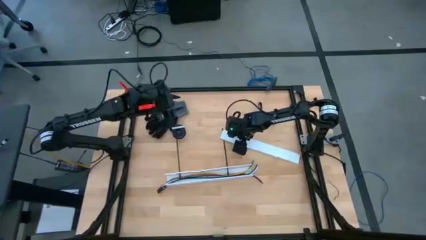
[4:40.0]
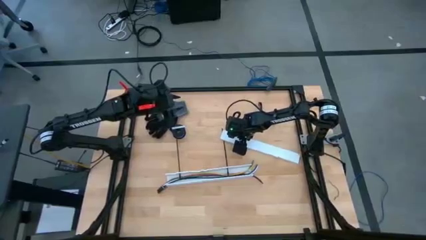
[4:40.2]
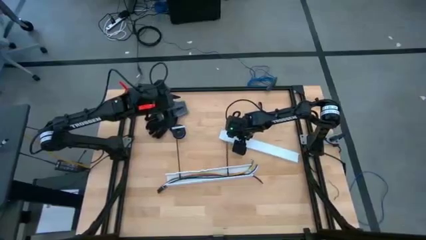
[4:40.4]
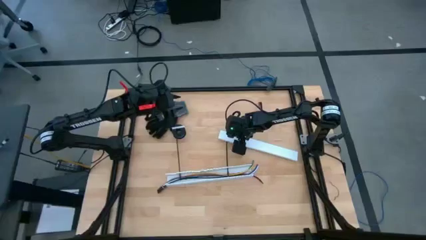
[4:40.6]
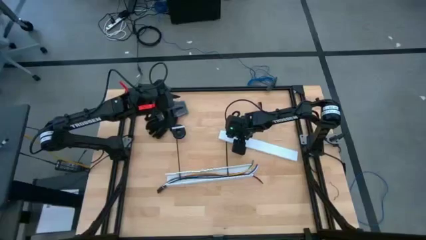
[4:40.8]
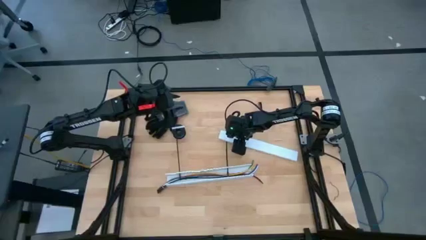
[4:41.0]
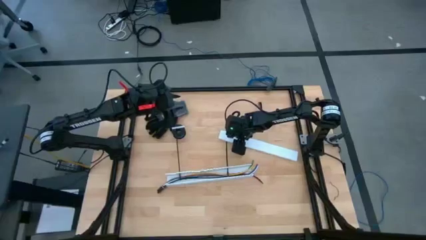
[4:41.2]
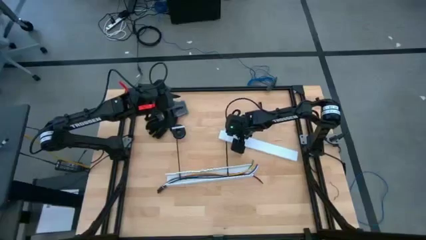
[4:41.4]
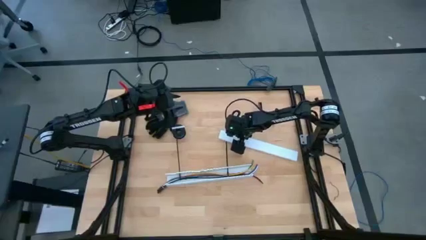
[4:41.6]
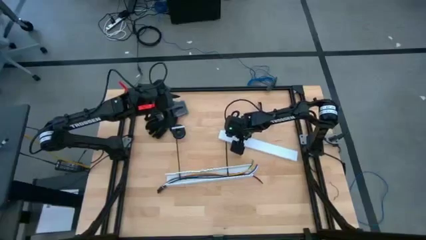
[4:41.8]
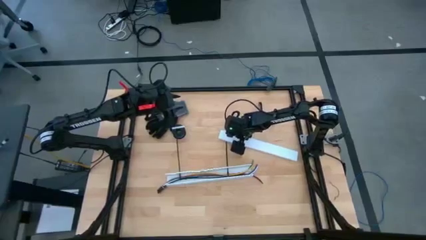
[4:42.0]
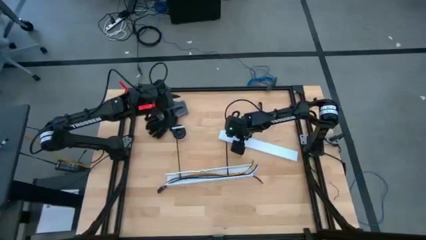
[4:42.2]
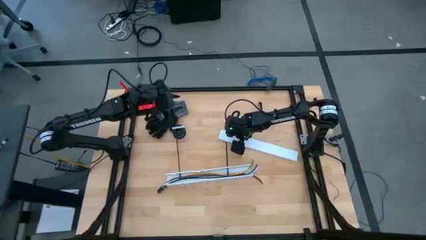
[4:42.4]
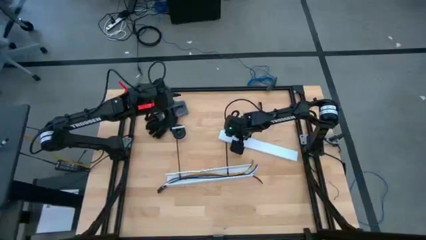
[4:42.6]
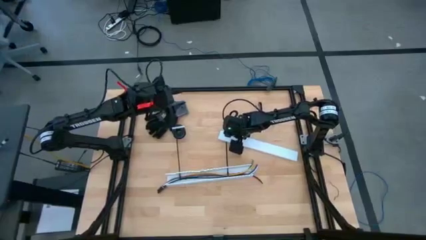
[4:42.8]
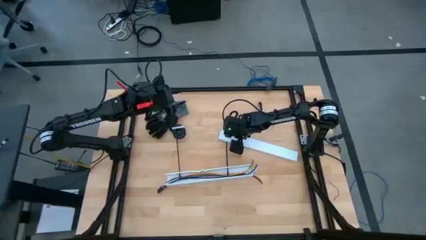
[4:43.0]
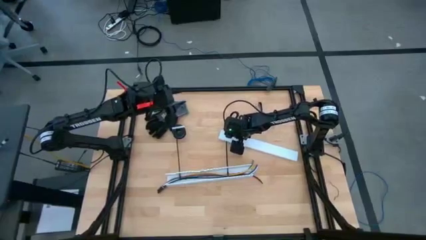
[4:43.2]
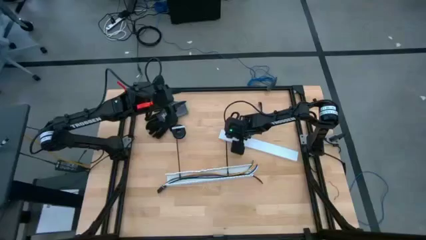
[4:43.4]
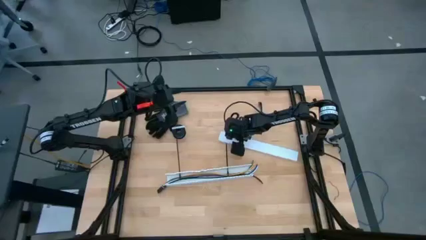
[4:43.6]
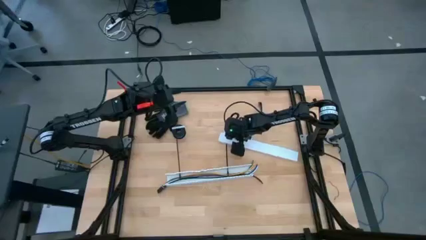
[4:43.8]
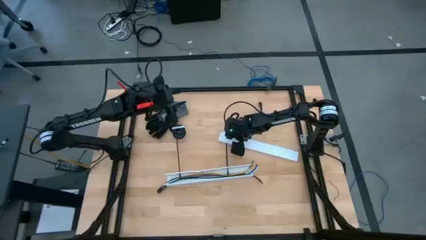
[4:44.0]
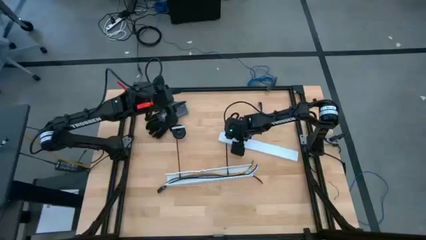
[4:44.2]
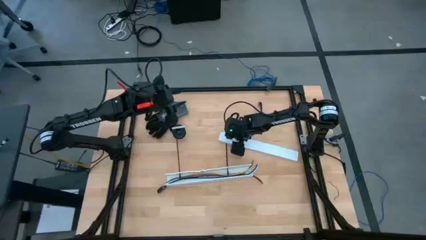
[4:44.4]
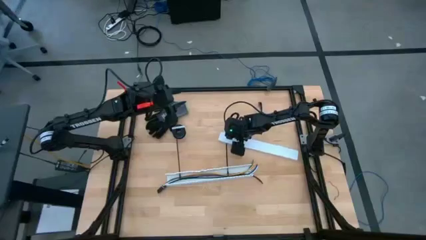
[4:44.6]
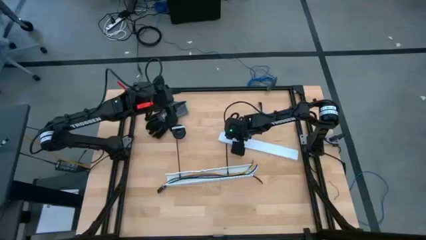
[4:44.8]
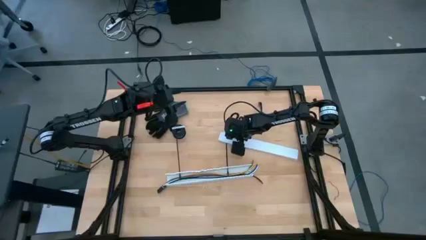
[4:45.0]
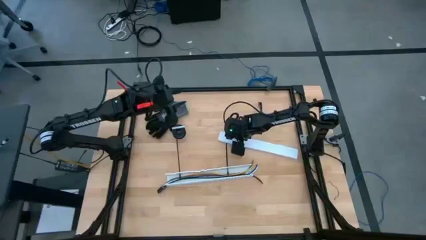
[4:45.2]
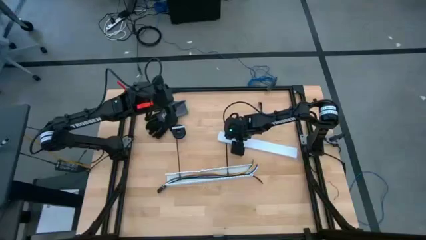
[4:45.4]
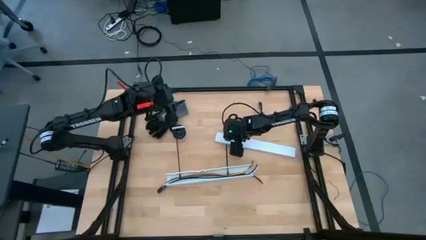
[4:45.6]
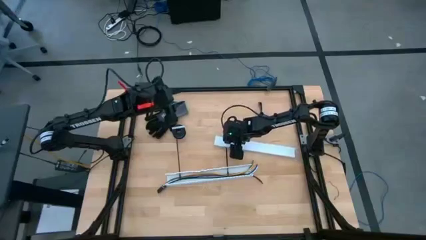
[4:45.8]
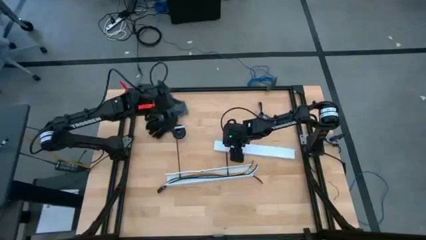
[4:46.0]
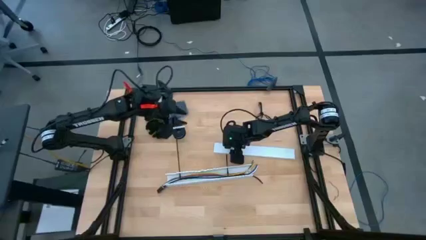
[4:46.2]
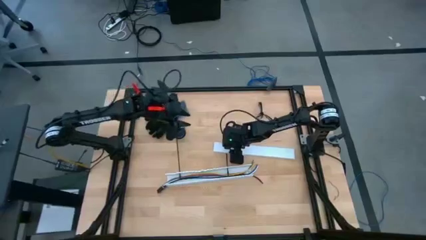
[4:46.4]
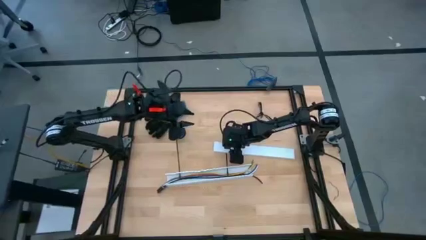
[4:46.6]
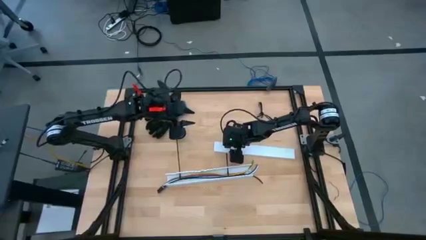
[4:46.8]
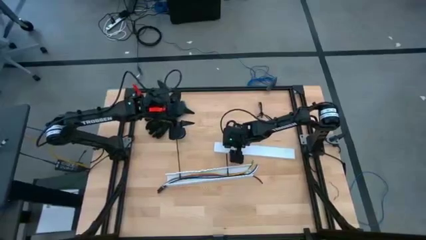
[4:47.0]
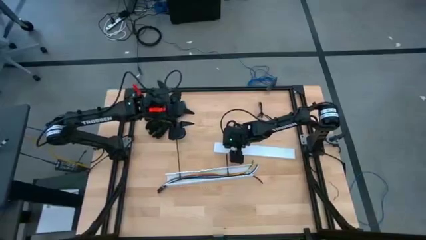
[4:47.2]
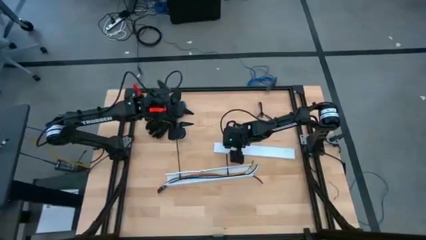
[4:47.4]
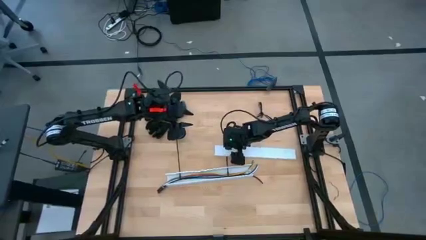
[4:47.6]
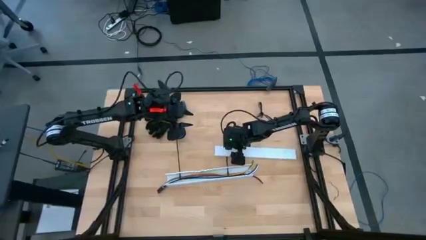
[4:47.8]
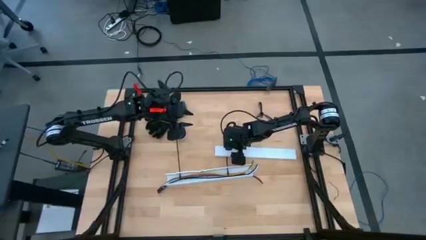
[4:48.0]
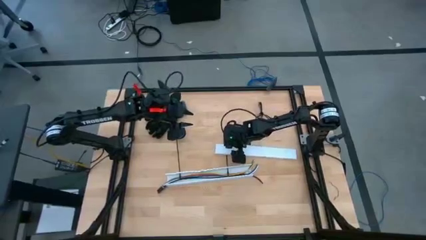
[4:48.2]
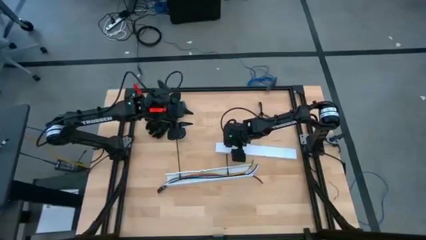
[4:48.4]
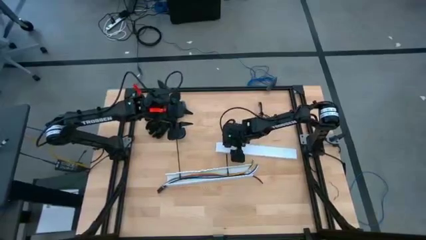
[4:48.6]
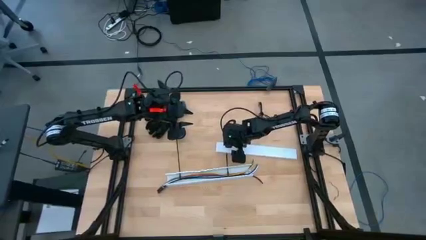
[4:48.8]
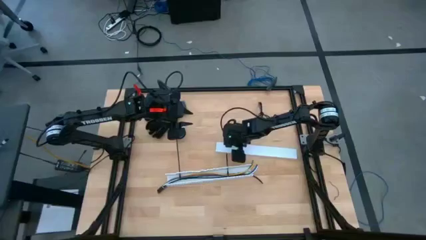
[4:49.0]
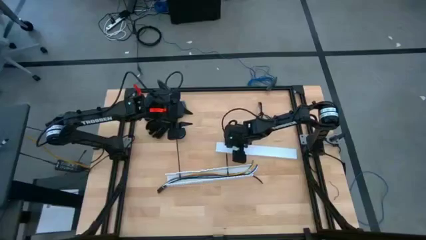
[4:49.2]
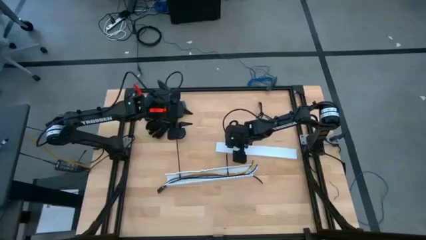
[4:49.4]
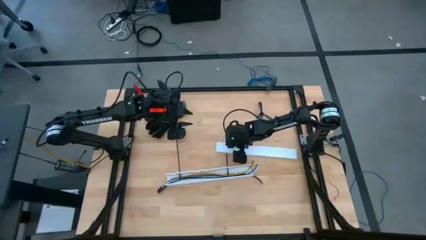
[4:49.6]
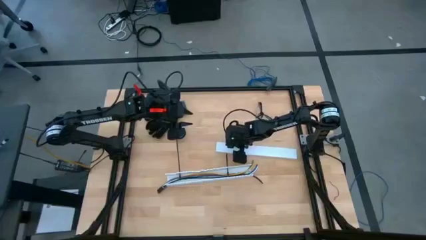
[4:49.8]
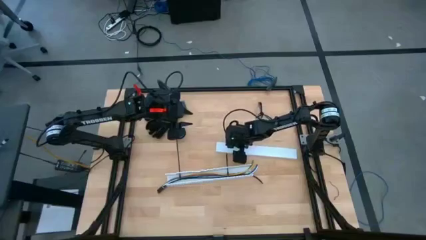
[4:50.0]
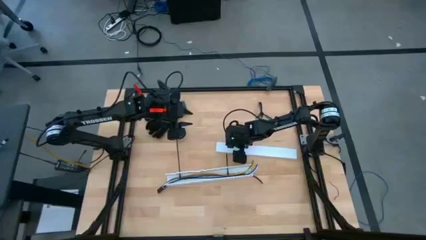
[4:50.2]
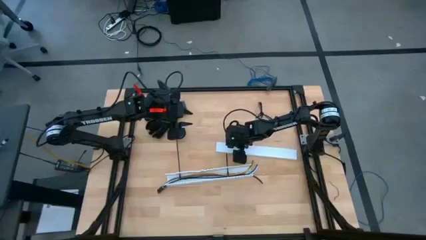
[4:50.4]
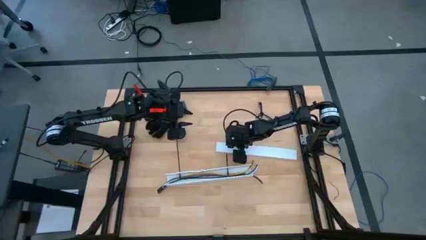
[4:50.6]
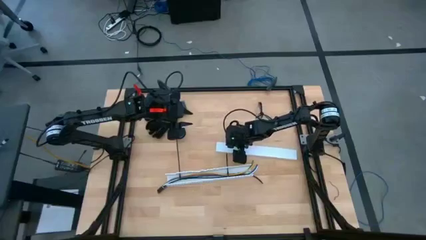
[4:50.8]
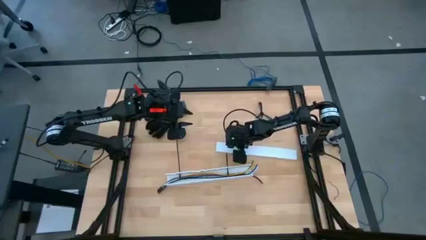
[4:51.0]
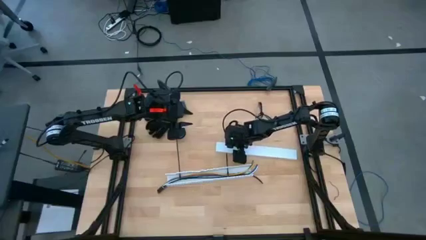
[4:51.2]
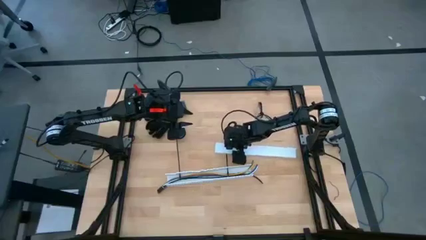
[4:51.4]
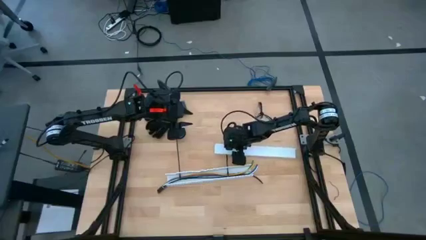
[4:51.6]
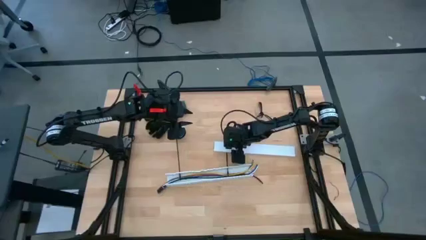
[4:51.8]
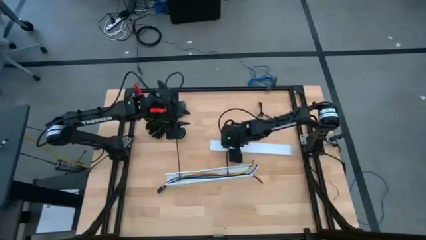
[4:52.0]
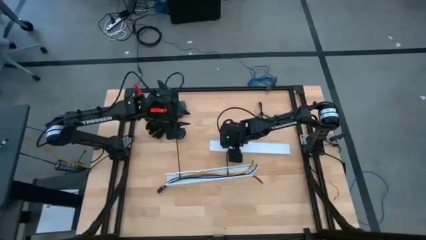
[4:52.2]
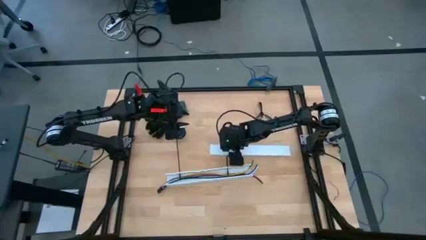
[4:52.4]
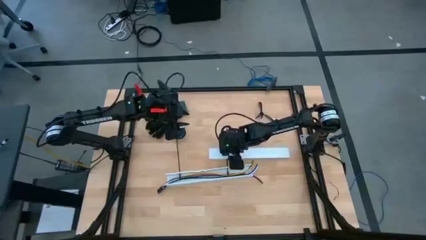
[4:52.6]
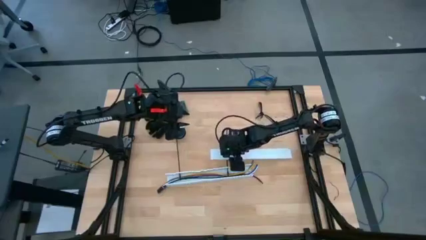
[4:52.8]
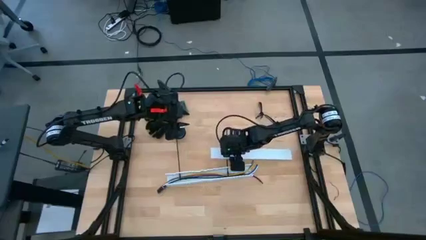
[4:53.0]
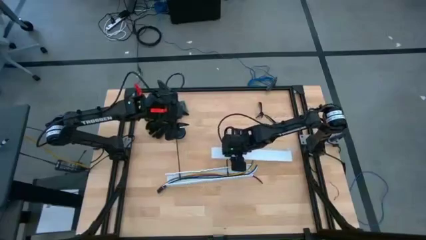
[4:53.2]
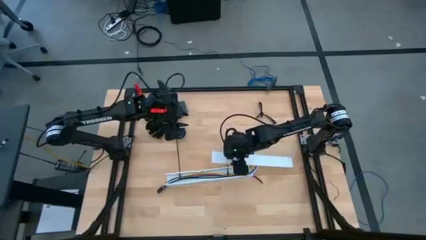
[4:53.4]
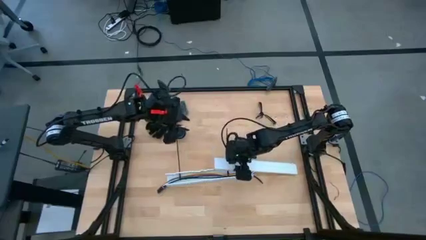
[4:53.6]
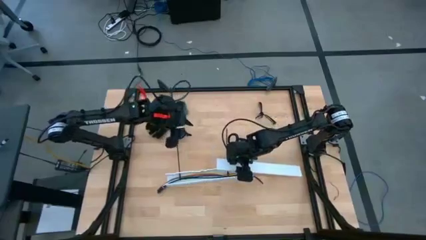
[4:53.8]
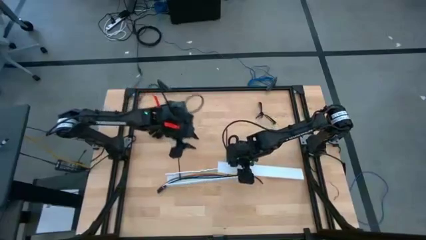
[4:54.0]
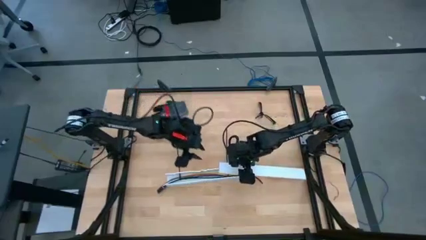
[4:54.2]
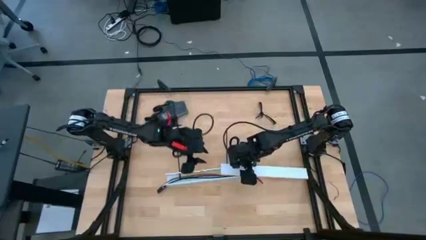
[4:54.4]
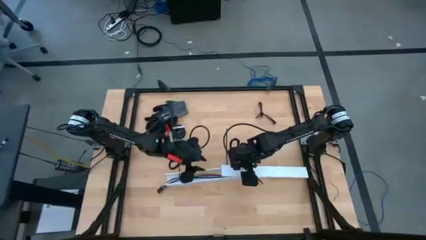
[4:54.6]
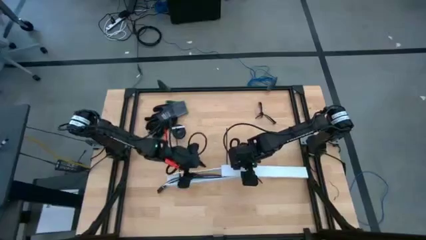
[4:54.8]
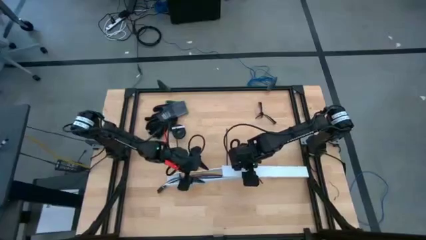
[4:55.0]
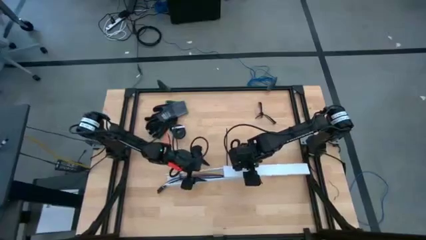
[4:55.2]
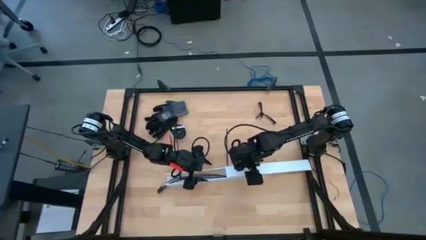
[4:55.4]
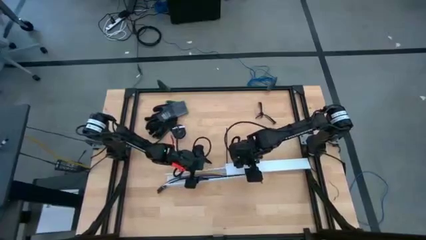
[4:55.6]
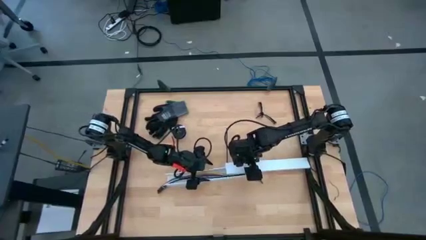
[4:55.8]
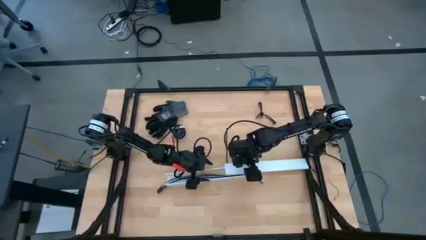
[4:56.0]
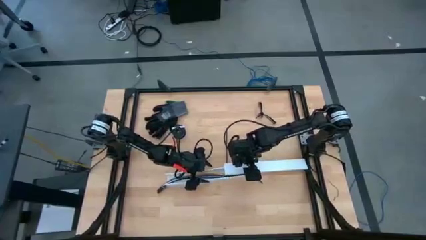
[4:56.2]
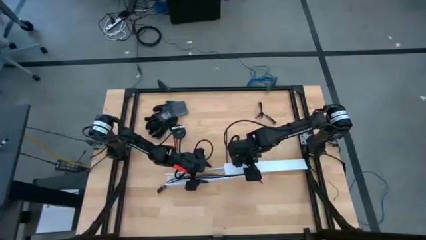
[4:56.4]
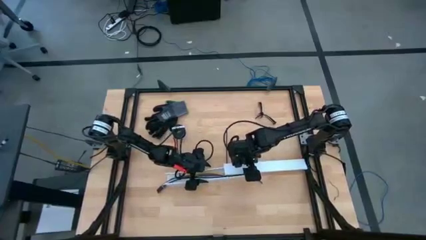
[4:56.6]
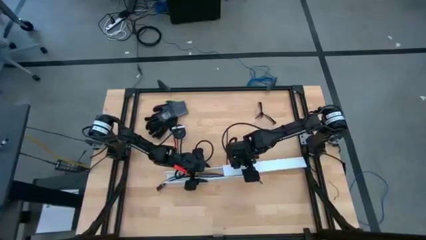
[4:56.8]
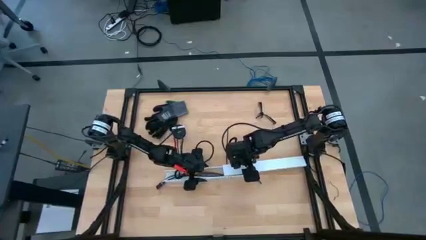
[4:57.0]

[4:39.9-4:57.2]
Task: Ziptie cables
Close the white cable duct cover
